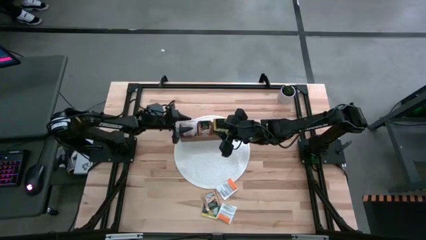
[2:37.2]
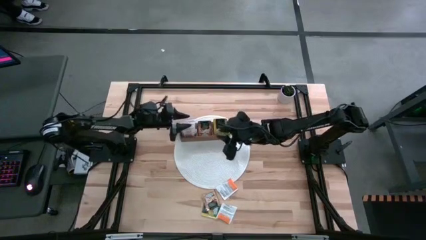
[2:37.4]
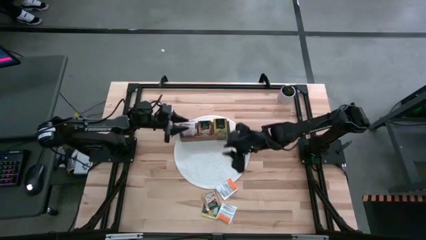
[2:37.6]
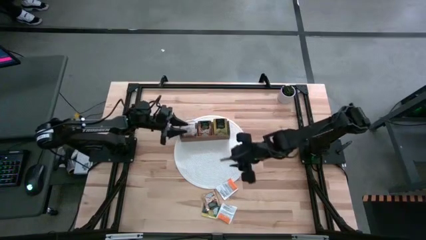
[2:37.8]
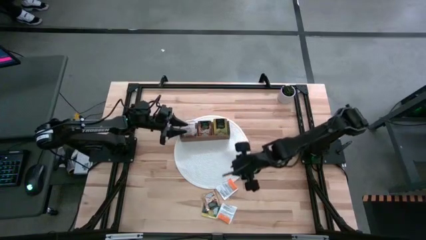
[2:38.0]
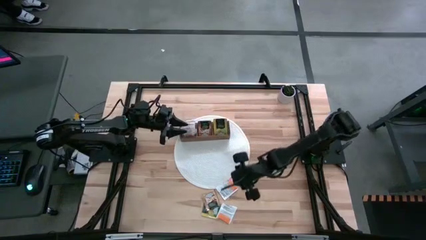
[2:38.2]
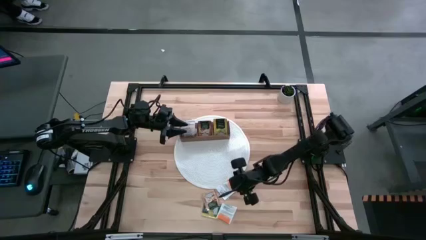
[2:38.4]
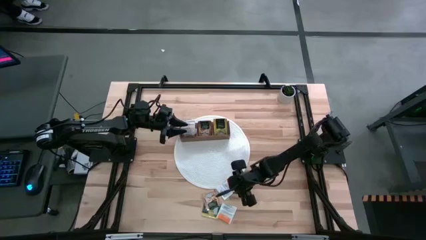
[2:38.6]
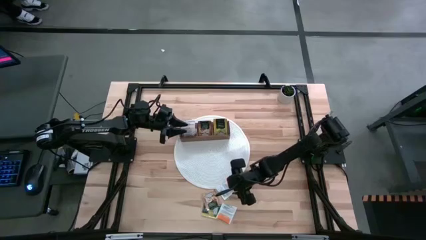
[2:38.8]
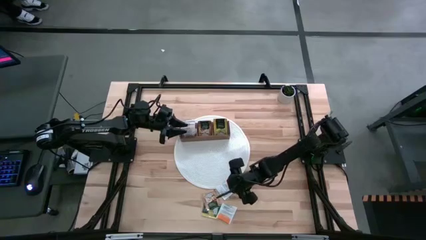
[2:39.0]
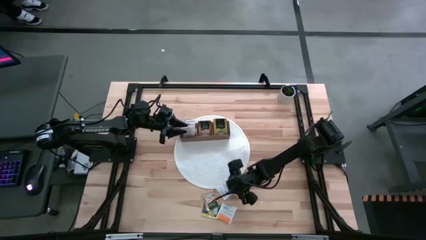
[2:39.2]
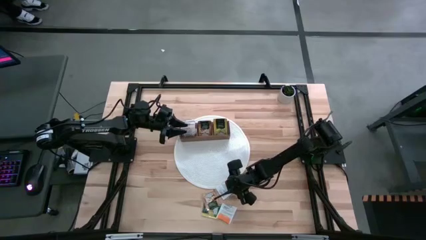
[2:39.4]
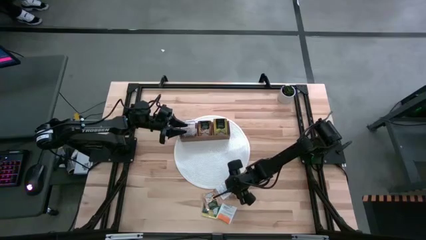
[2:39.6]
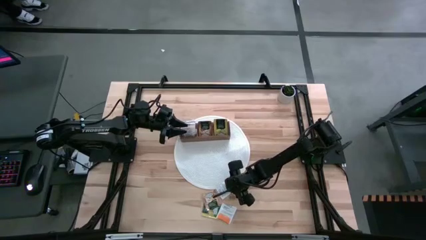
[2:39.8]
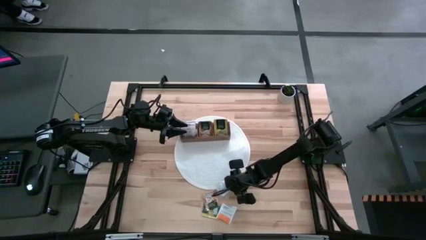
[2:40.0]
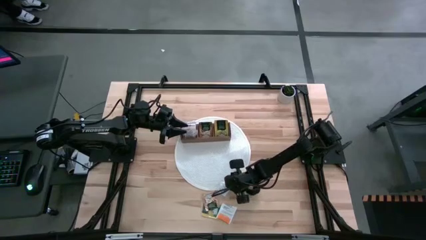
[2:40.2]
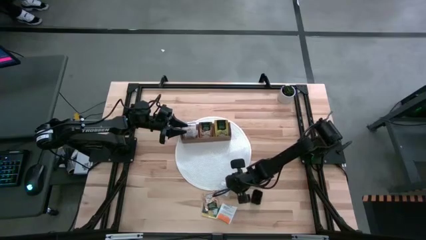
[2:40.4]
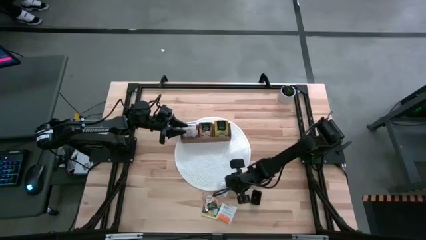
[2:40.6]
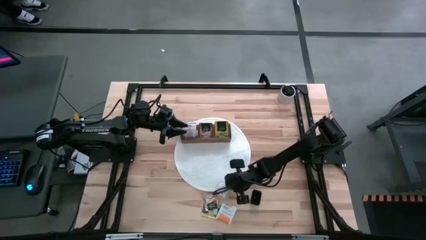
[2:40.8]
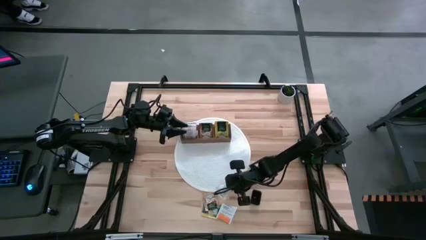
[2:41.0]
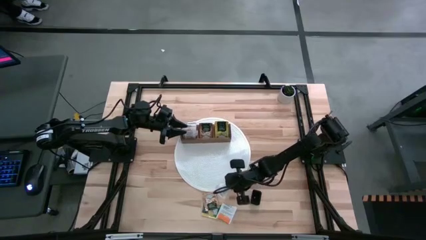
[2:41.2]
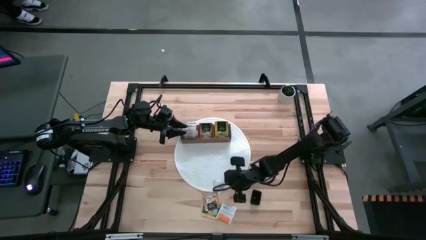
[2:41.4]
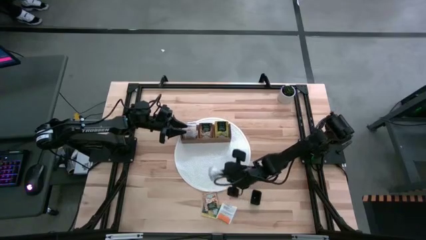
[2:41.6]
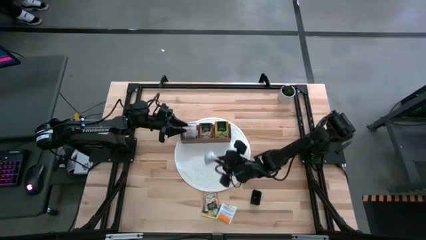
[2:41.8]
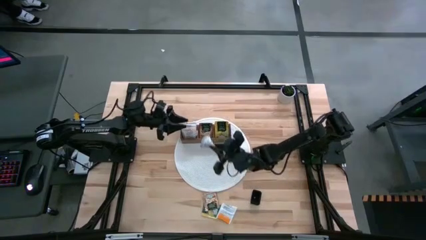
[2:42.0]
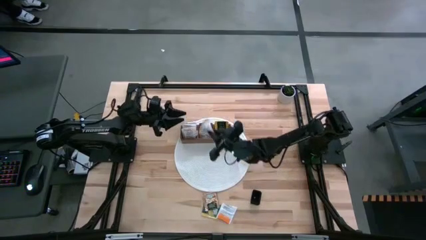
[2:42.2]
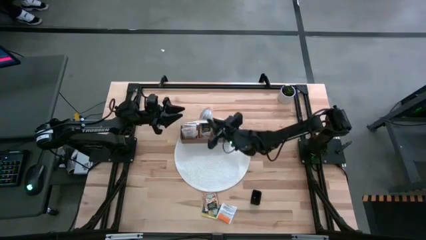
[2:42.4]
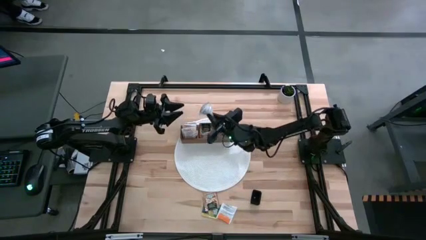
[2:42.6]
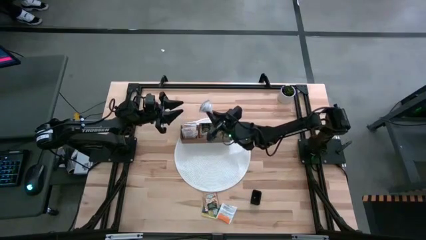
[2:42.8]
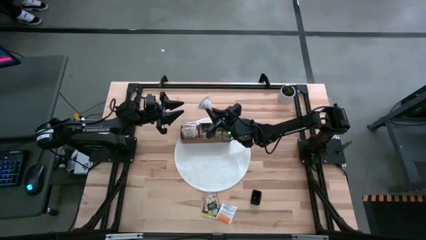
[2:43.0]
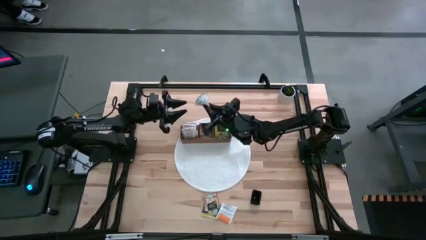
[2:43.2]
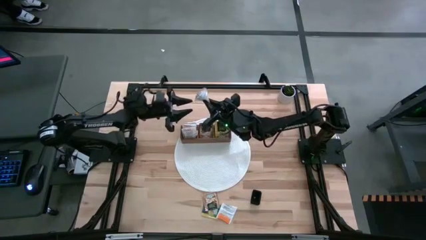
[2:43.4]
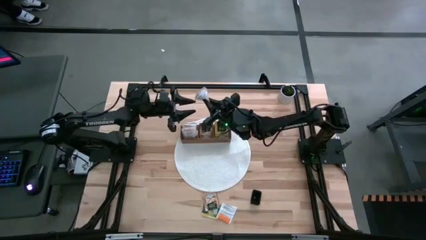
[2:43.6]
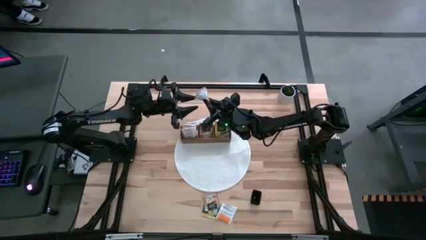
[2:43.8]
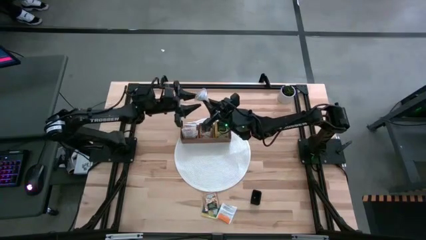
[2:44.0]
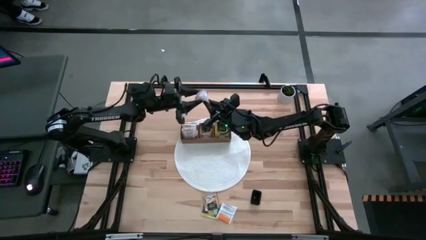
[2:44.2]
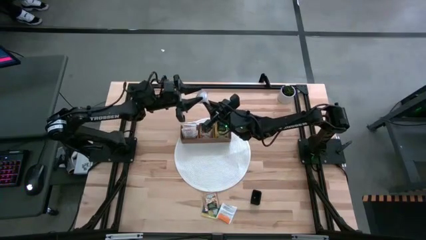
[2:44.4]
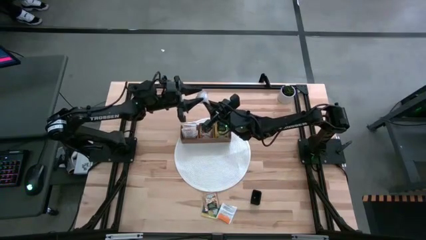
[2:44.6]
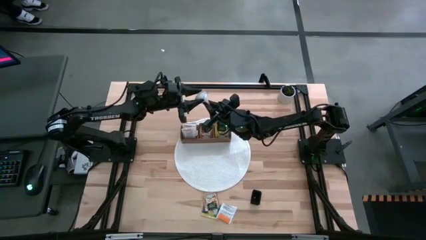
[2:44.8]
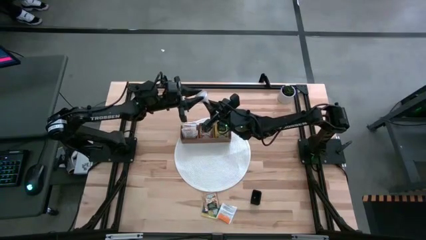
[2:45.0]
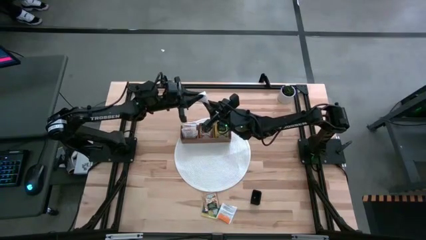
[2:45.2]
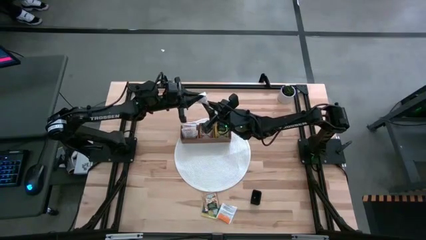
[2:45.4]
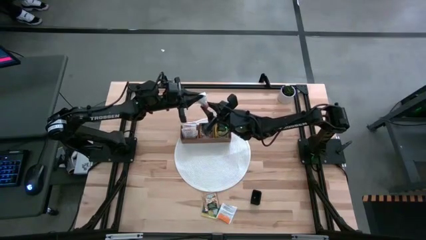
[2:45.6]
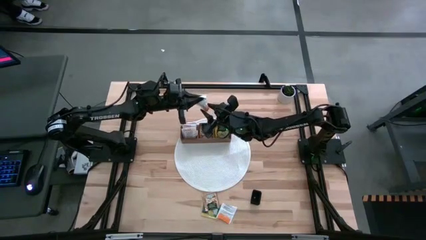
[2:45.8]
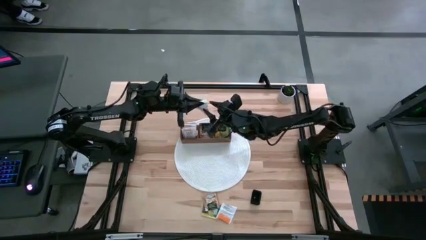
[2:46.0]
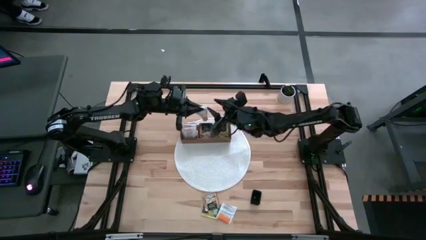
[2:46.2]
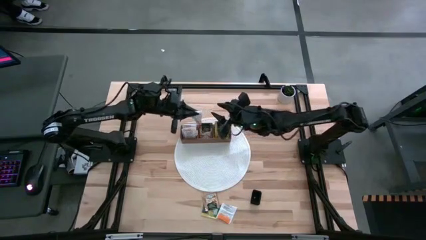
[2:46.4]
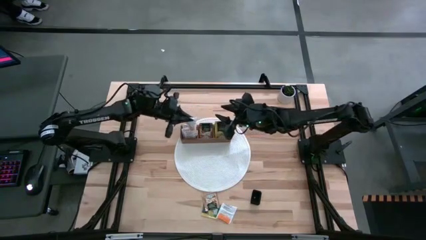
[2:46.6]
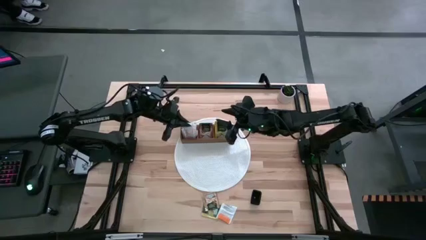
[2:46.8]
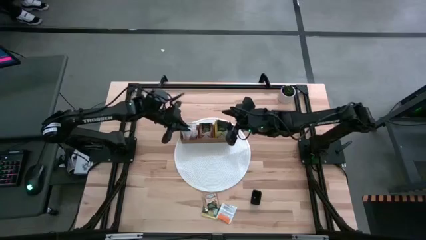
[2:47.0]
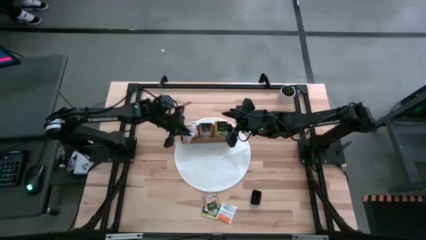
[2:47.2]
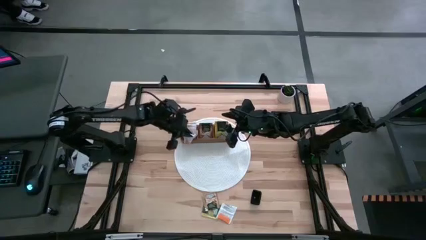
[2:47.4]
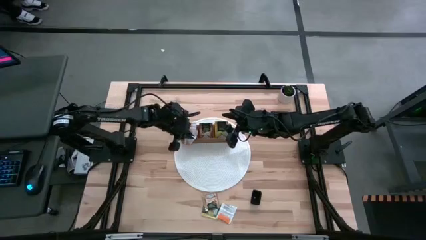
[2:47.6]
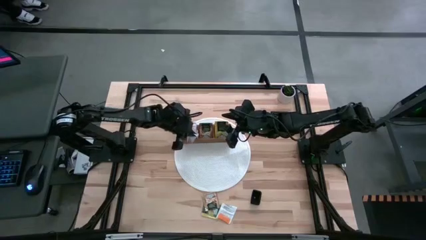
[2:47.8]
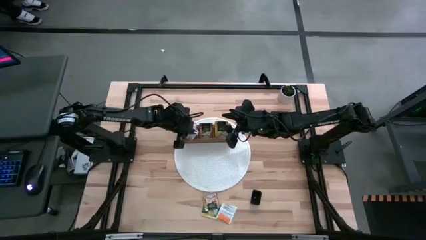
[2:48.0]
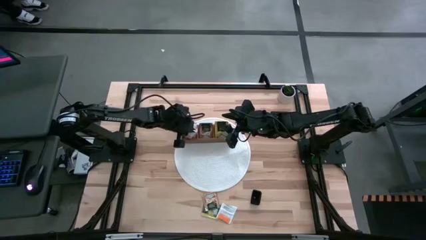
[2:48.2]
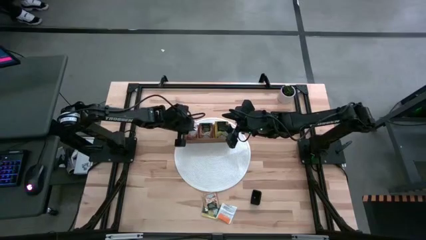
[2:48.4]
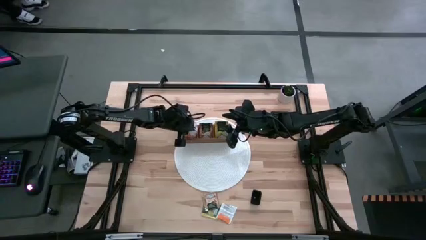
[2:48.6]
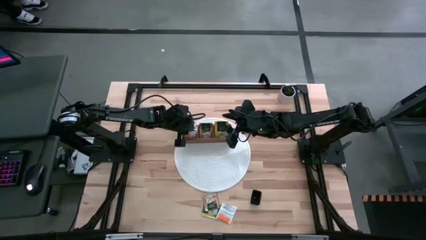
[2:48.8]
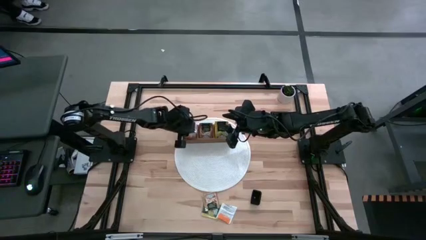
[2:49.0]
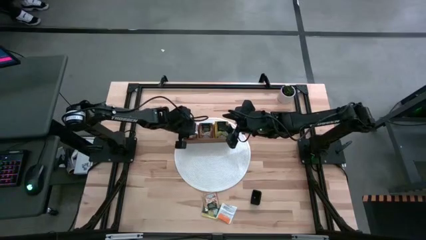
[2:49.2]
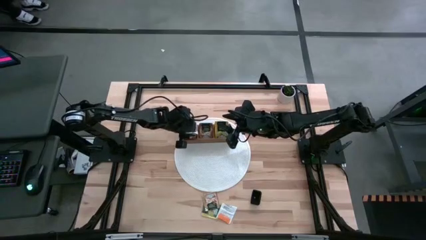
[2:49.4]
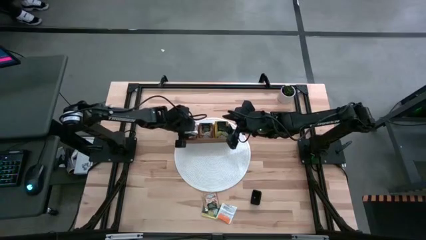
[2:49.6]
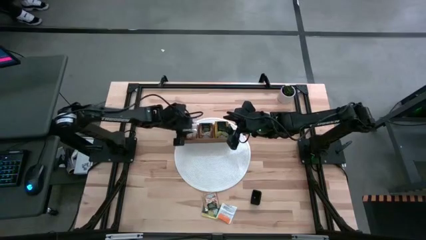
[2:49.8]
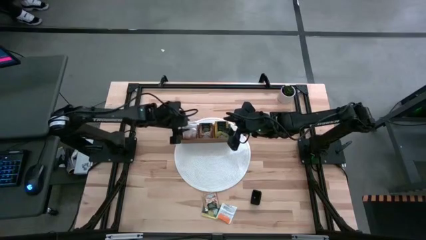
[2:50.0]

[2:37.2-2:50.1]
Task: Pick & Place Tea
Put the orange tea bag into the left section of the wooden organizer

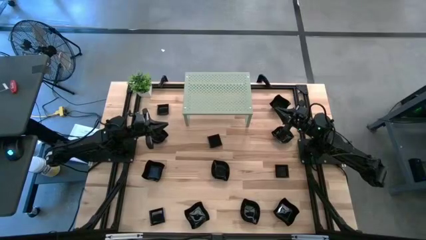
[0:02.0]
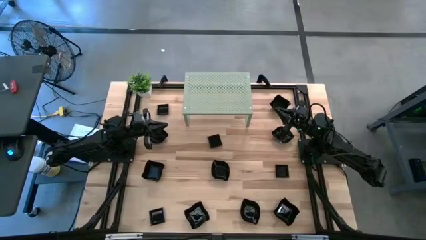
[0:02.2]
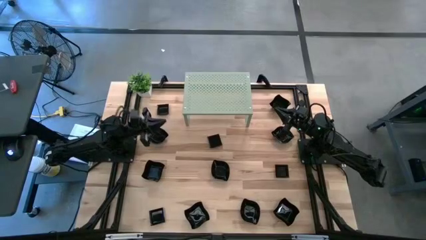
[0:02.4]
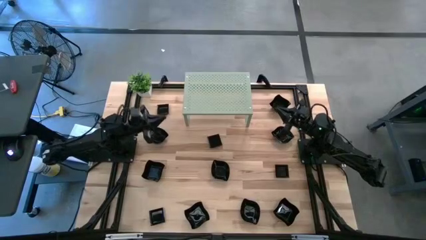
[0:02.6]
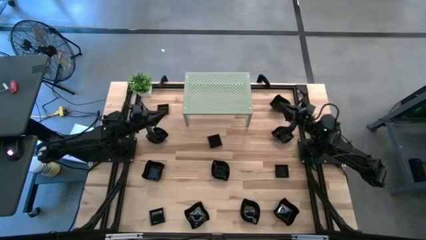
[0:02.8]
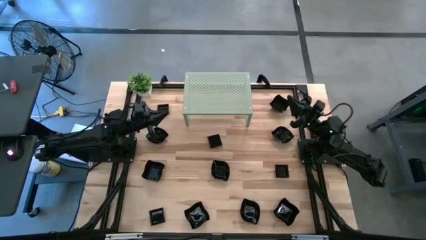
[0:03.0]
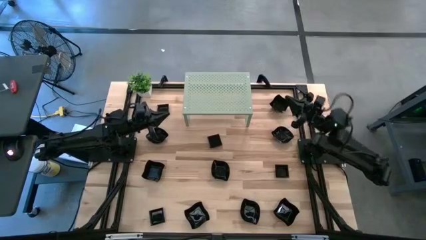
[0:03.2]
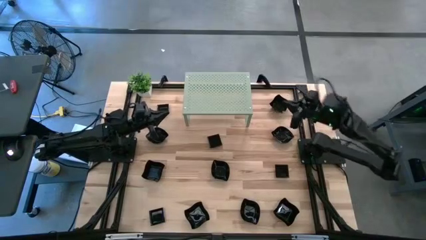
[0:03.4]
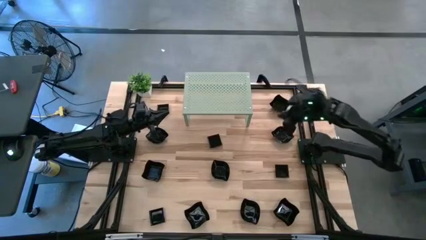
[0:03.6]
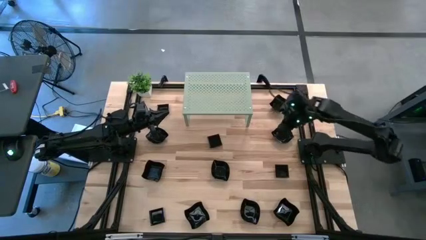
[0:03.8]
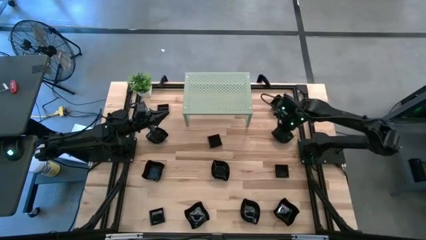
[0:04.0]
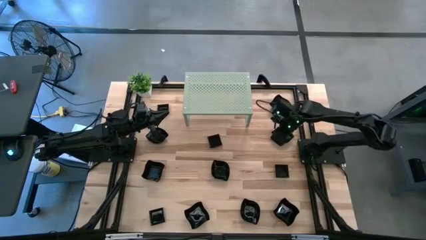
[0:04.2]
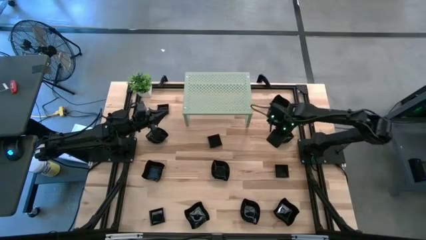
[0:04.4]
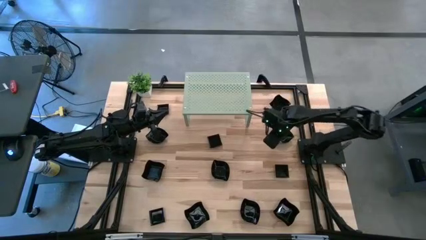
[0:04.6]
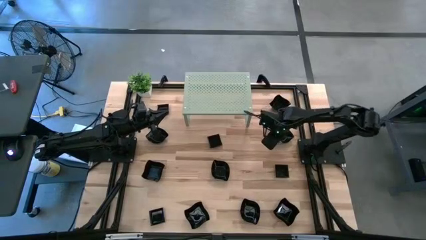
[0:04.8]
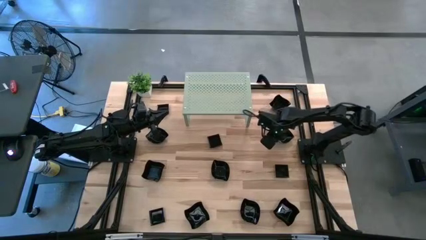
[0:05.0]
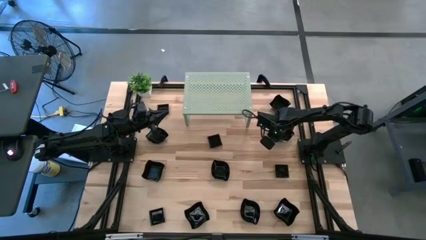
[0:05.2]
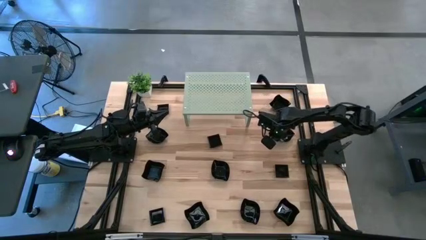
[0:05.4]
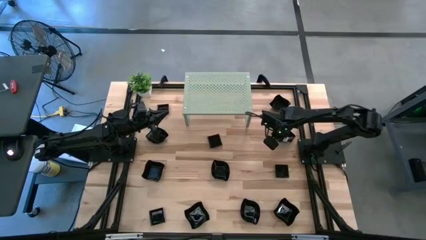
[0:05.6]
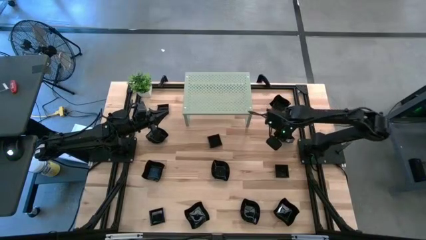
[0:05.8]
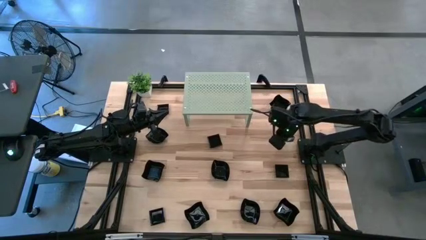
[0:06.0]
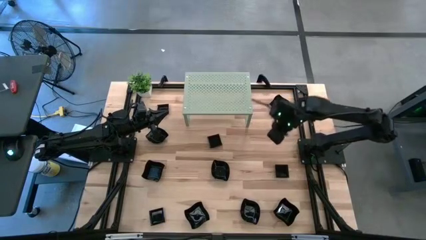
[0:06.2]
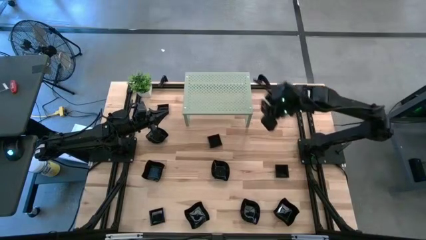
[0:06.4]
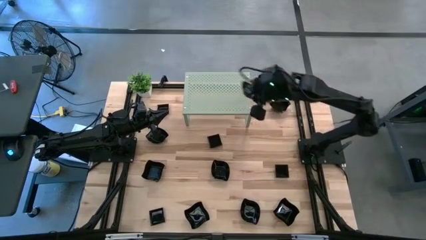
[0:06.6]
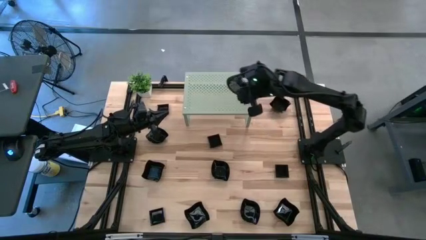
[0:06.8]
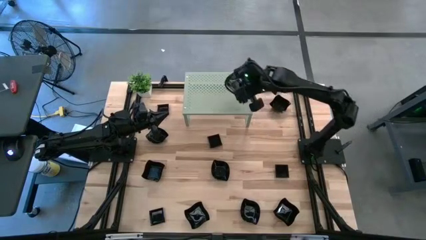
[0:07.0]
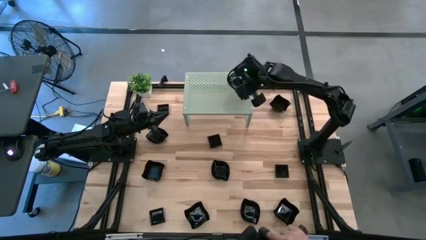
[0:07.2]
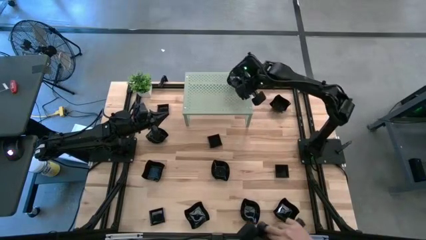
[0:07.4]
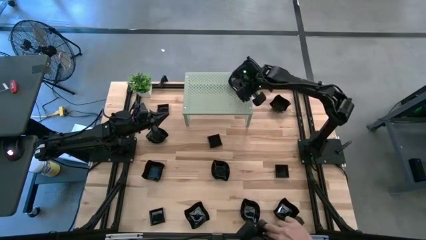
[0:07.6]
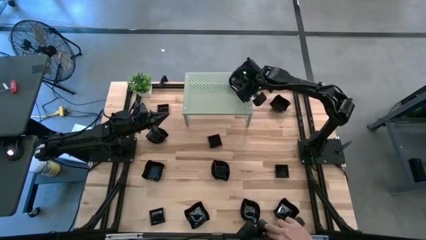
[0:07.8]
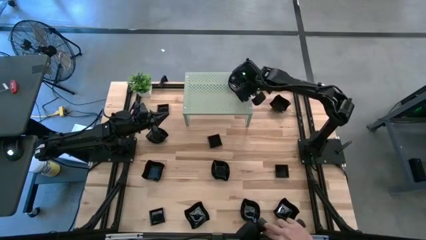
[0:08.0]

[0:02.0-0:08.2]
Task: Pick & Place Mini shaped plates
Put the black leaf-shaped plate on the shelf
